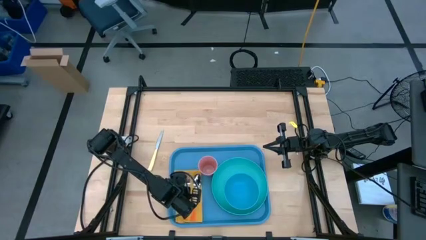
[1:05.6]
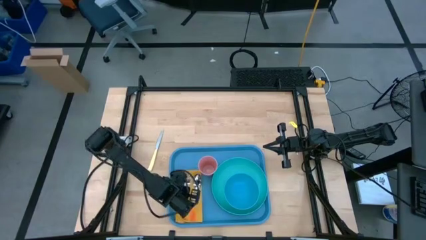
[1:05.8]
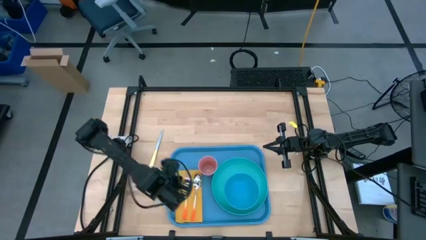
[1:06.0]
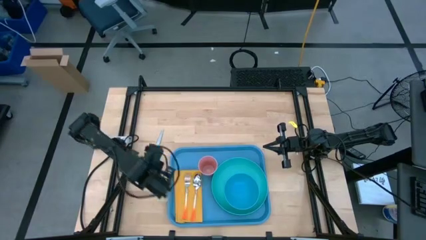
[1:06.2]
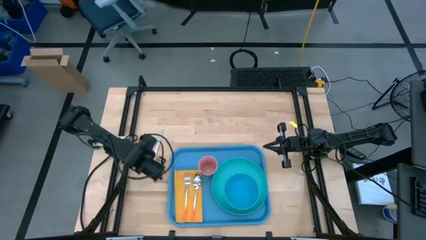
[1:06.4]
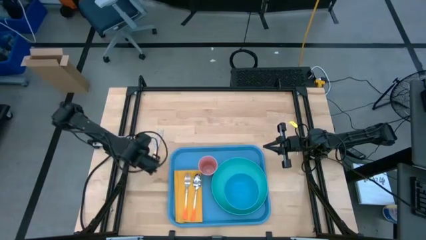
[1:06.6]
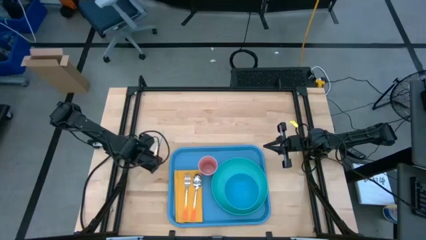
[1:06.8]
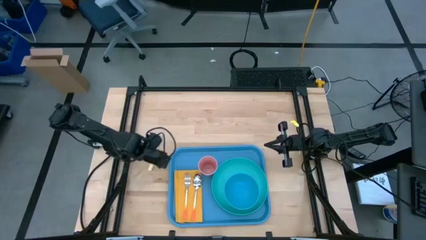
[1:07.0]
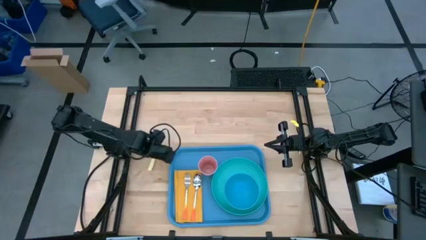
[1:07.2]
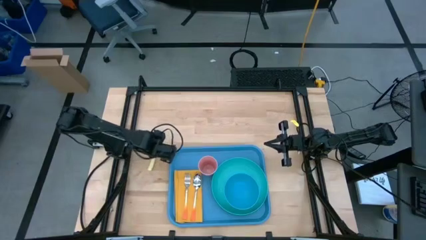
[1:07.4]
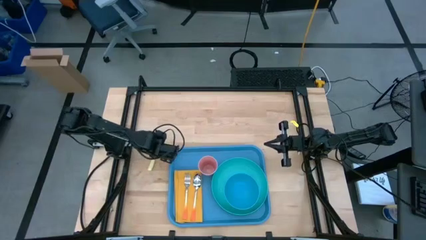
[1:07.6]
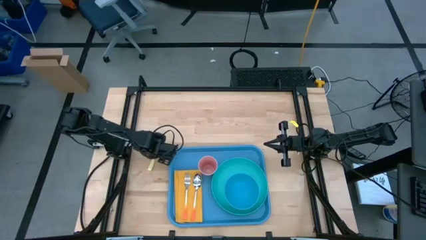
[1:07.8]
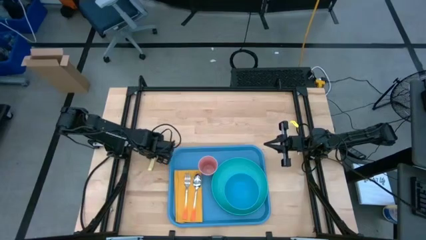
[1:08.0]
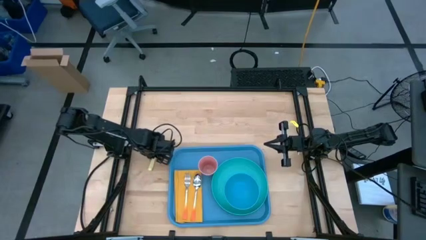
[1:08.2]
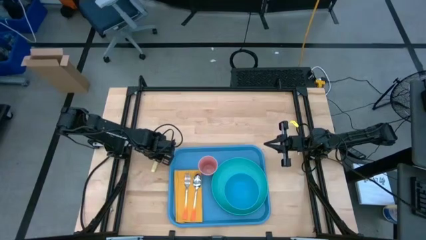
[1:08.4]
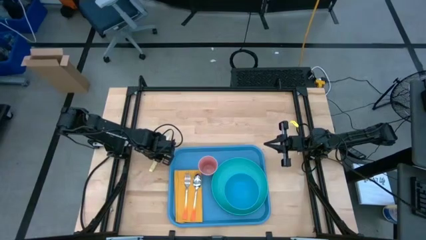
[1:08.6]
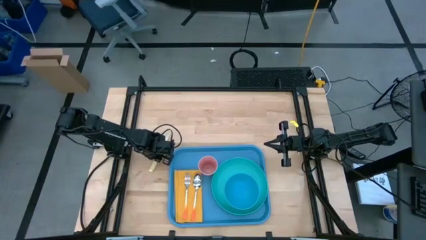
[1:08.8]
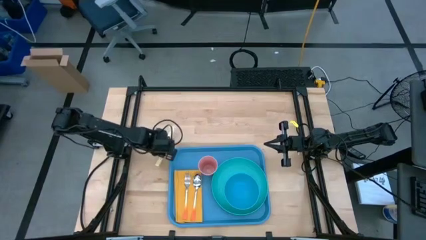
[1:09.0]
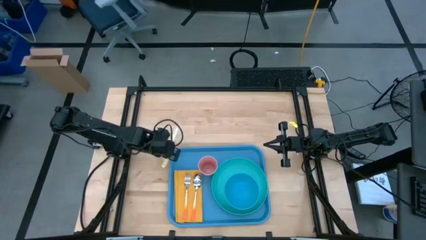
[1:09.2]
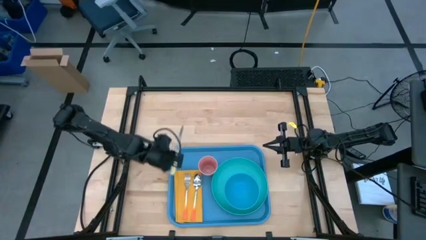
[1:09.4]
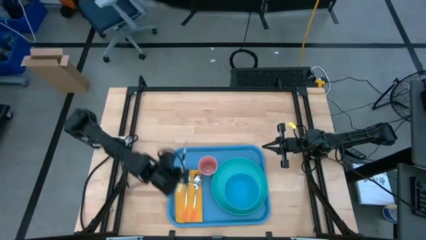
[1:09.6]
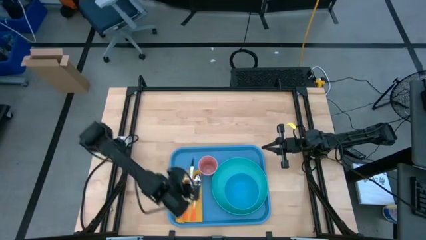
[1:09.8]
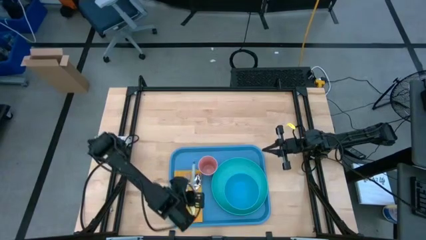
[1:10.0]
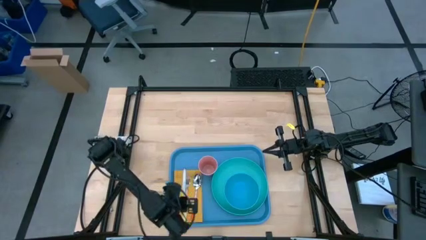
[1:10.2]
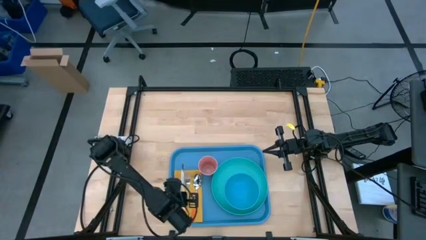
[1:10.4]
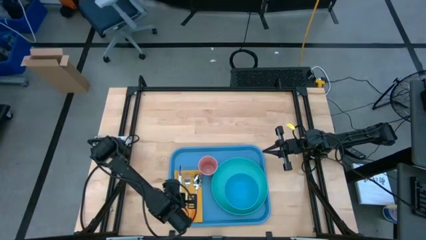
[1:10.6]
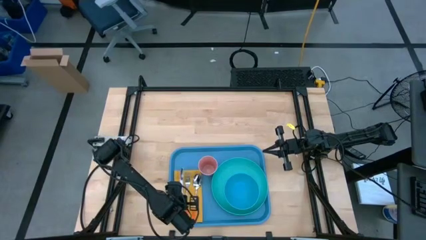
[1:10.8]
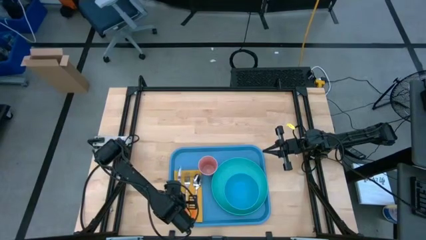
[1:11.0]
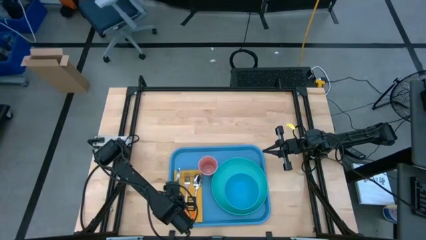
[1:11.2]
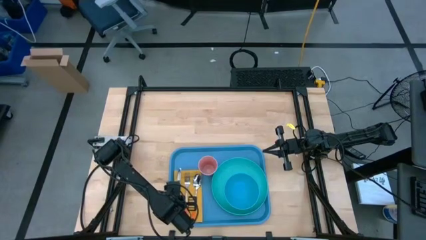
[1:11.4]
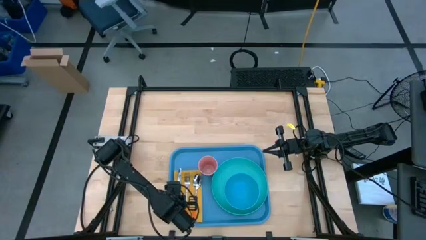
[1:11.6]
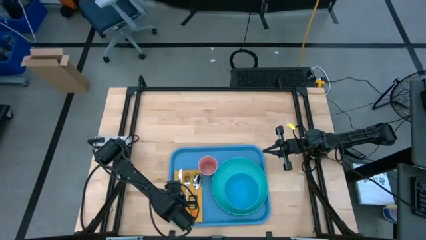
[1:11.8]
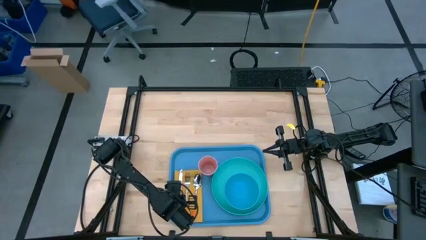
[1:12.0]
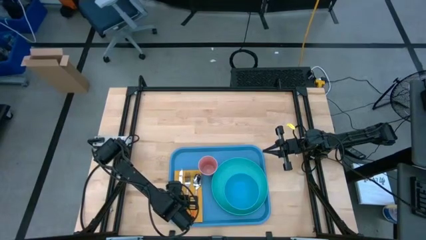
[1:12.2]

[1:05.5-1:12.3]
Task: Set up tray
Put the yellow knife to the left of the orange fork on top of the yellow table napkin on the blue serving tray

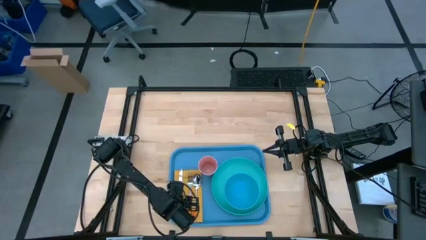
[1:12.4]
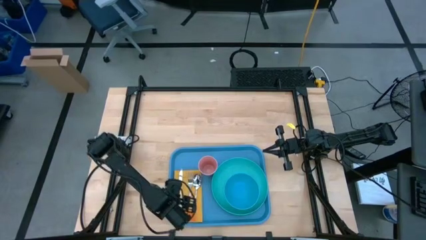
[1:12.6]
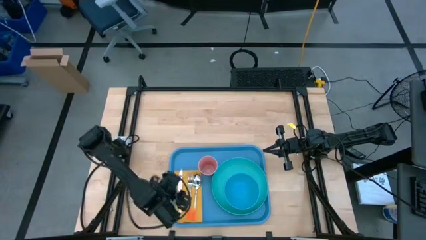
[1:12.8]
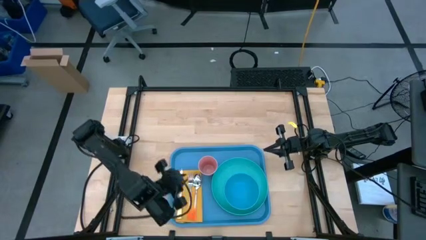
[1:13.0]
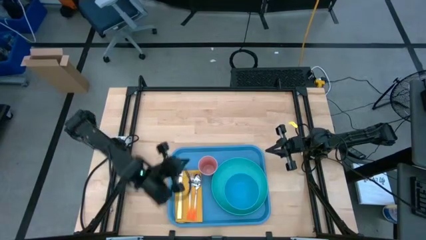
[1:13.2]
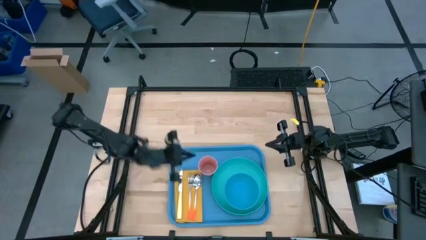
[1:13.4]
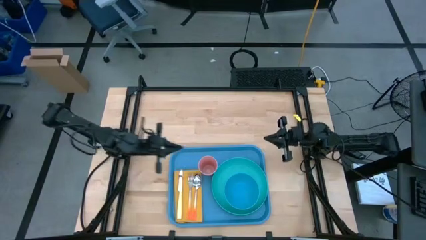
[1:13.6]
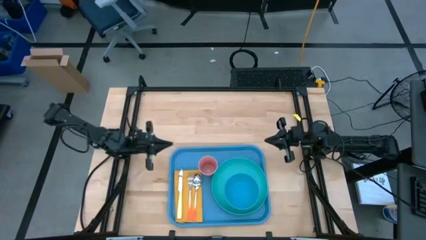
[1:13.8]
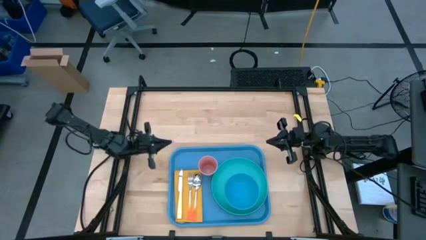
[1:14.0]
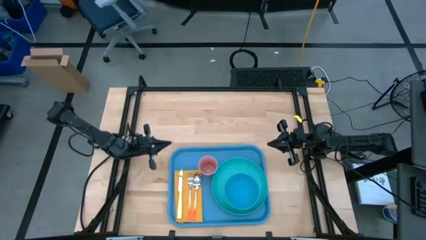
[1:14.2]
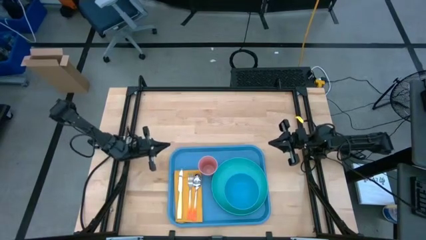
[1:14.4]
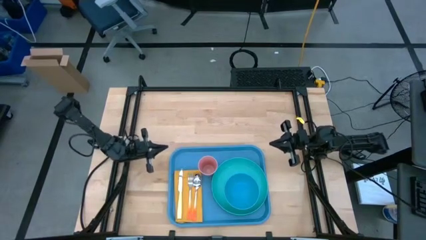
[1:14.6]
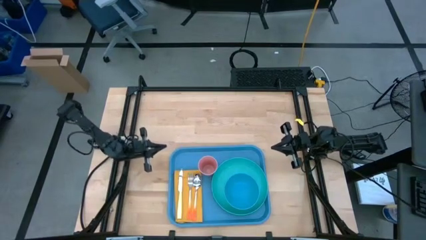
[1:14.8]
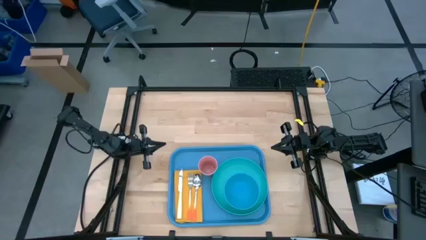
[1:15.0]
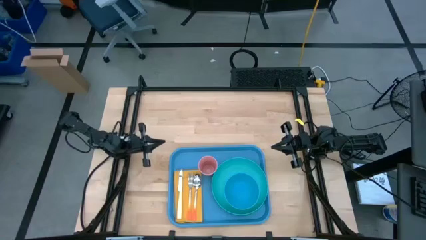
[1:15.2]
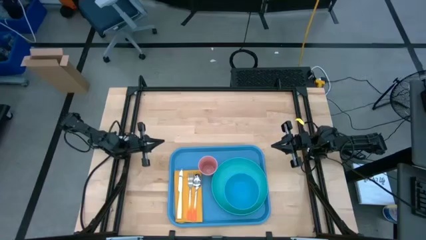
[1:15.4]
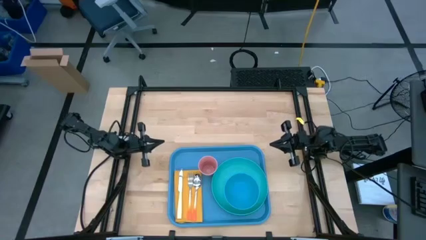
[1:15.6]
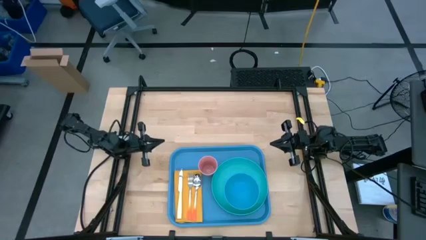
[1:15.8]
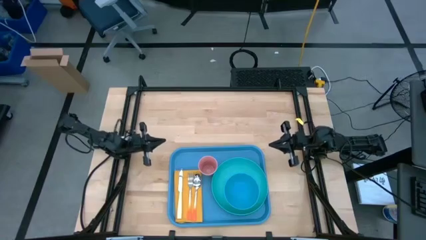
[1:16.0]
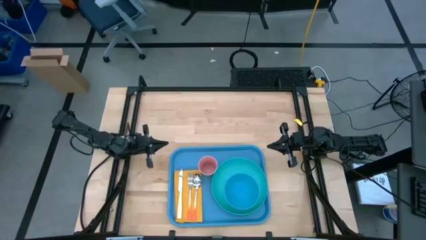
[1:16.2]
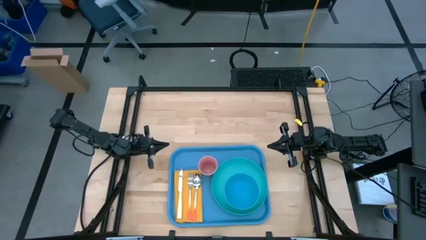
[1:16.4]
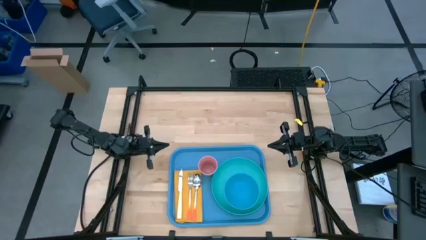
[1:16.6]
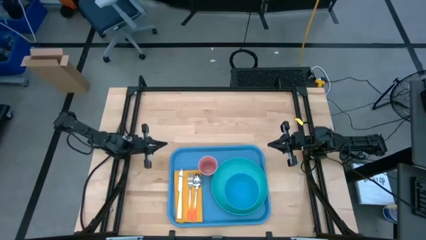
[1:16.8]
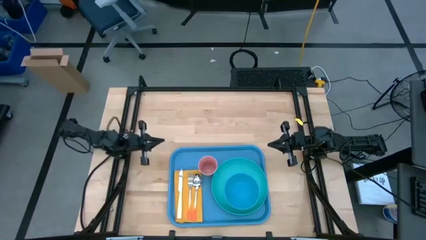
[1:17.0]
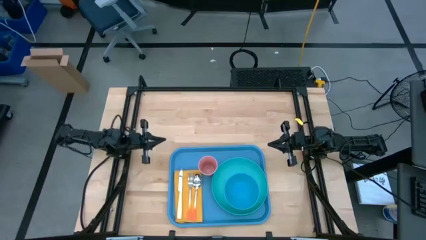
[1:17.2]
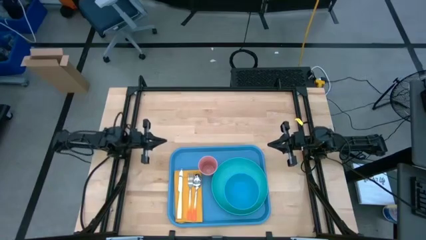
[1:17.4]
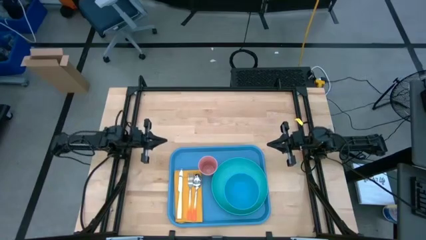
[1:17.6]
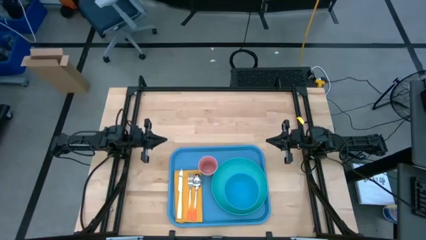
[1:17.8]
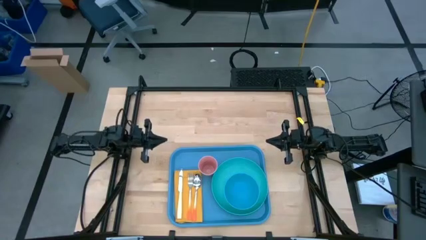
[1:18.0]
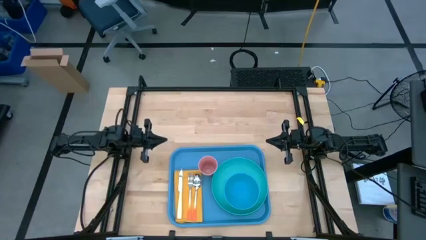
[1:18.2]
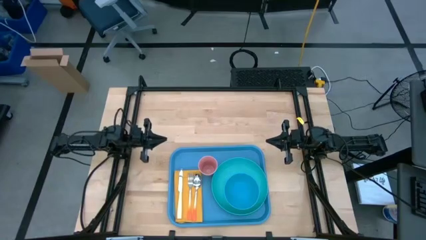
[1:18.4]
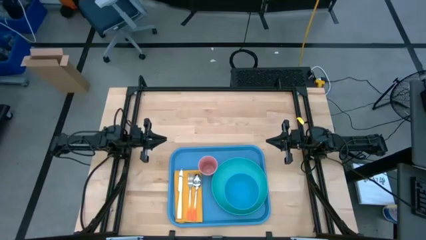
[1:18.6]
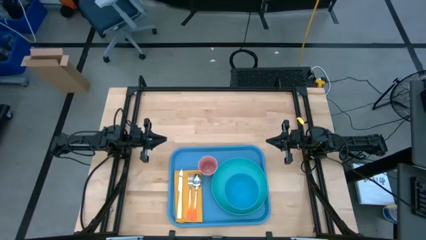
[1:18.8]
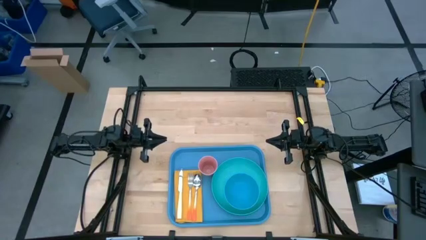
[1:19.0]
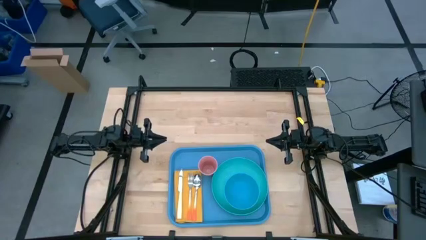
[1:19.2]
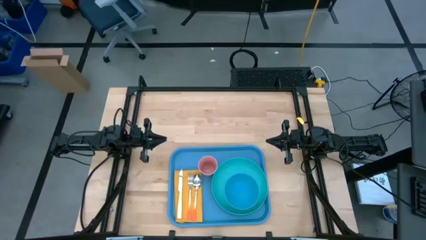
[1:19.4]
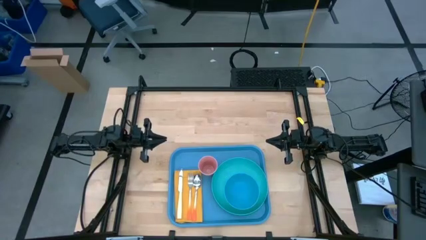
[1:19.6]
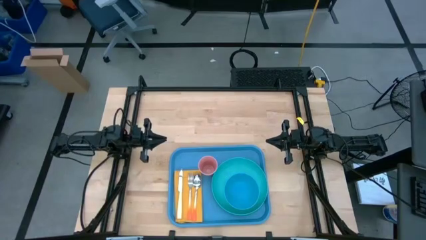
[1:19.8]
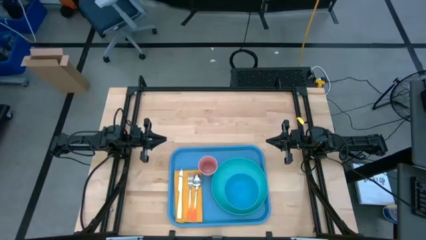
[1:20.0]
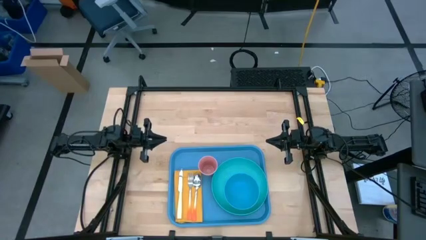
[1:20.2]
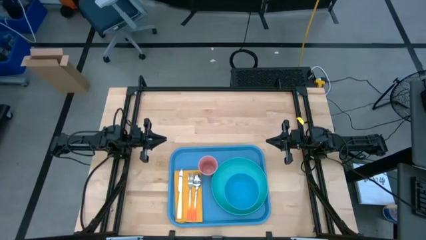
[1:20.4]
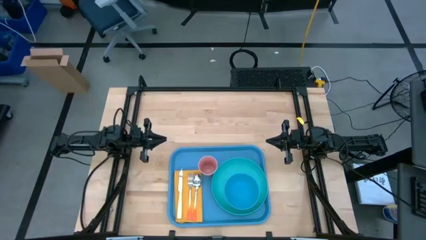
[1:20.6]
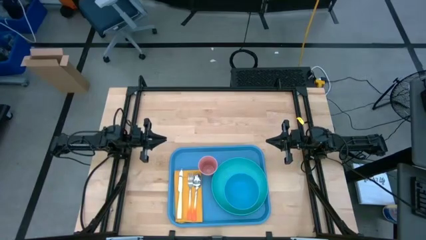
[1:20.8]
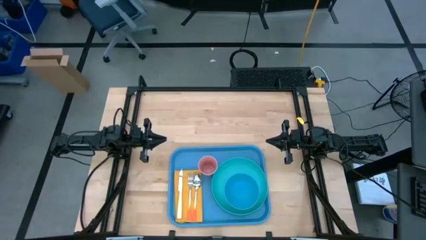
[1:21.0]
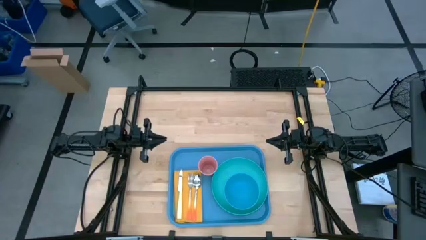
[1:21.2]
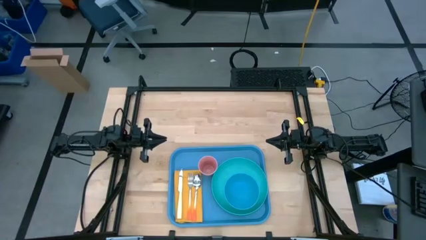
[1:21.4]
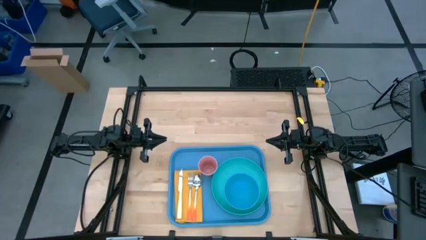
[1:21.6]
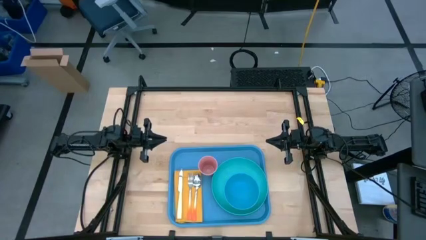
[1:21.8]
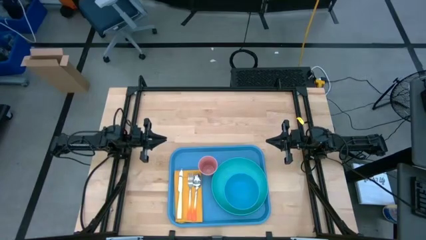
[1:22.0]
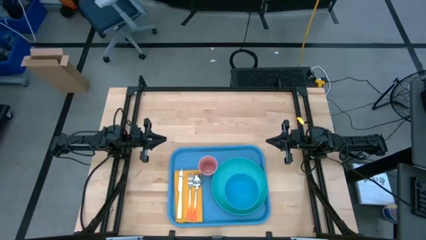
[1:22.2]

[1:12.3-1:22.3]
Return to Home Position
